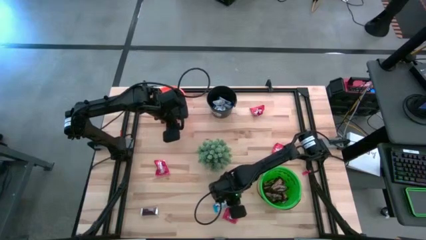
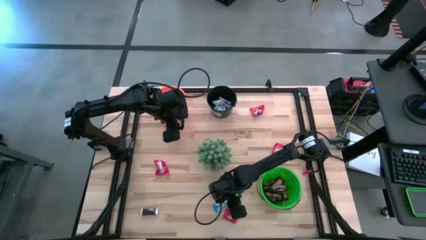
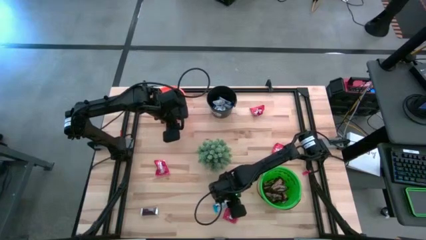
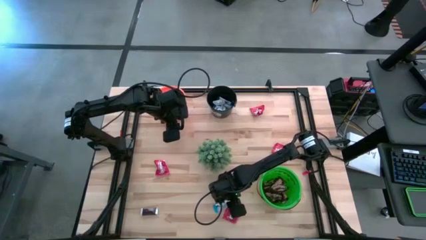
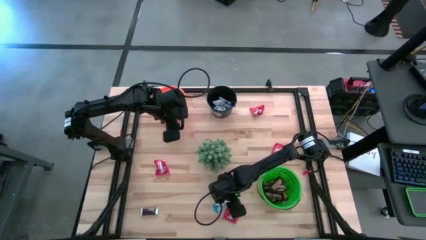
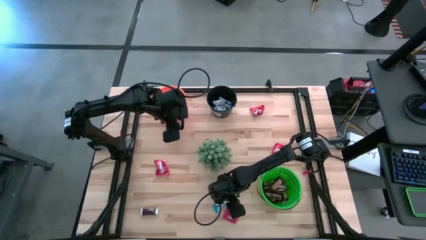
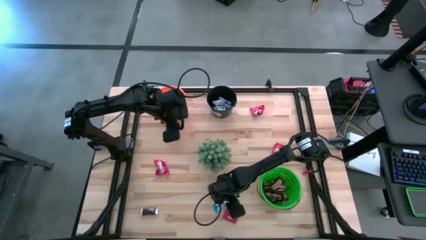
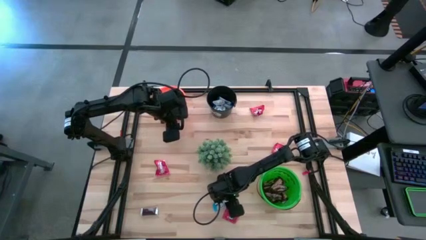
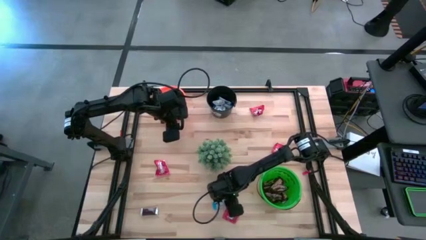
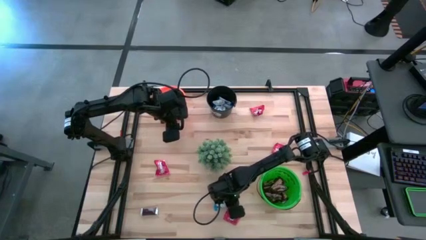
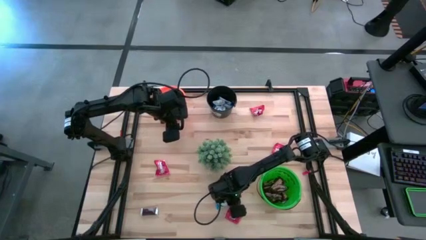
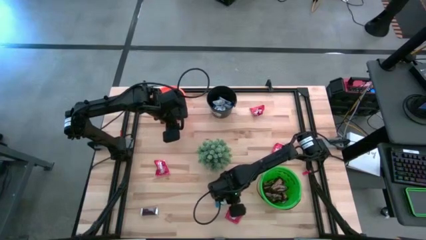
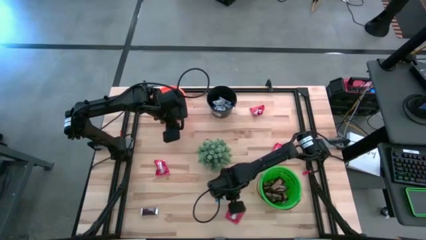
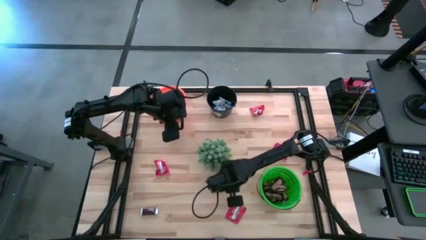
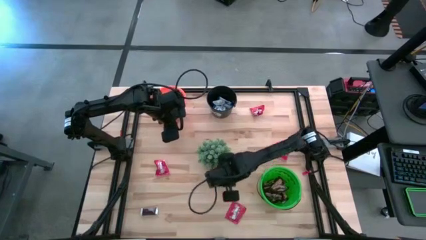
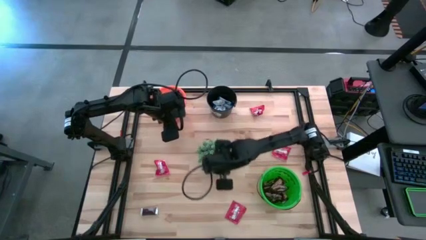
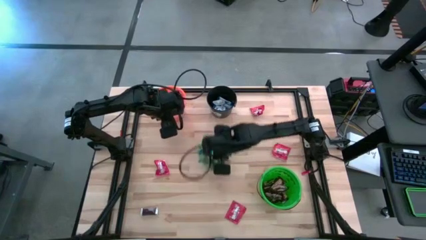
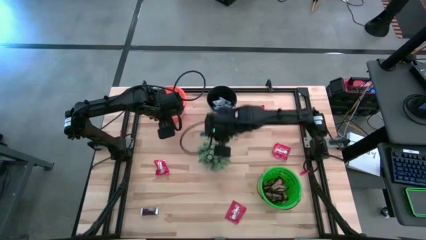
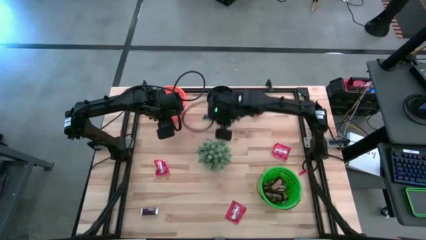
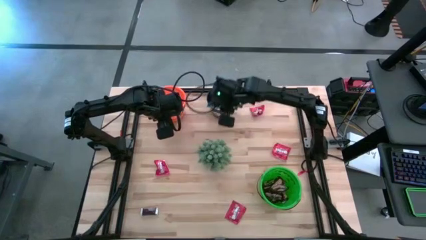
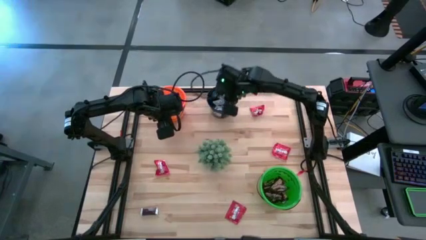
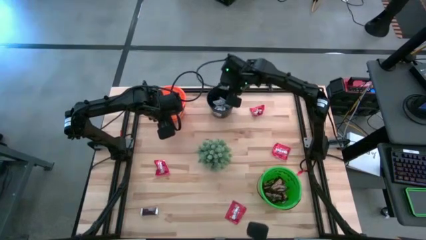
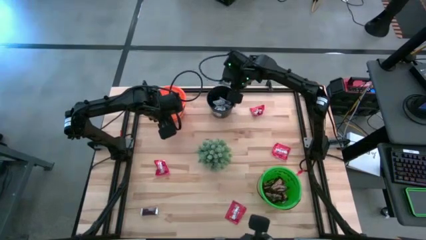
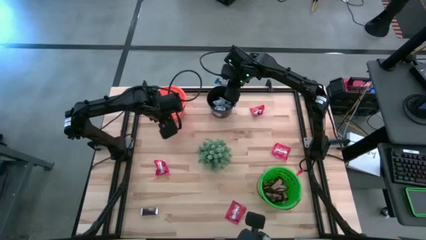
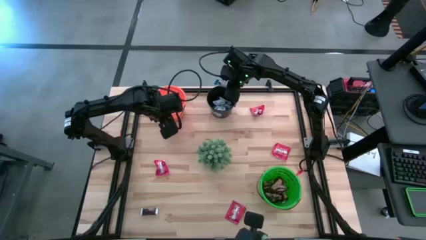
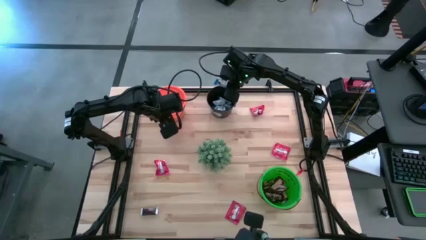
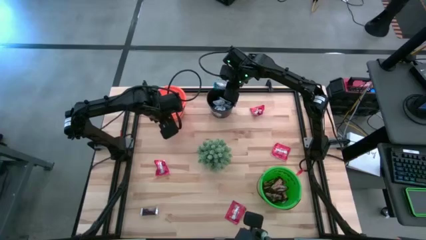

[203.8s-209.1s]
Task: Organize candy in baskets
Put the white chocolate bar into the black bucket

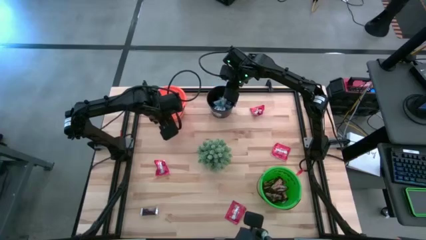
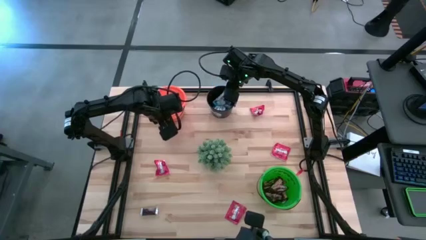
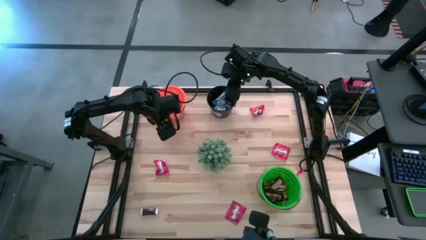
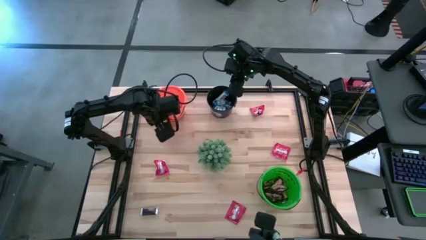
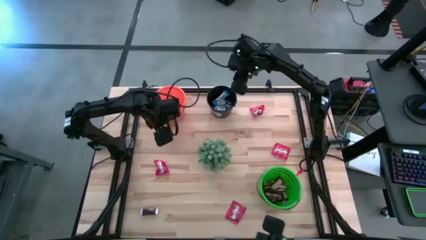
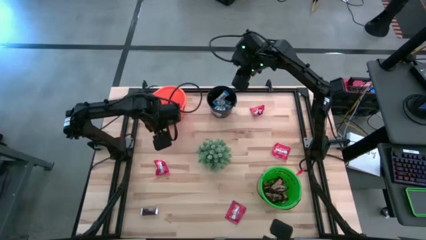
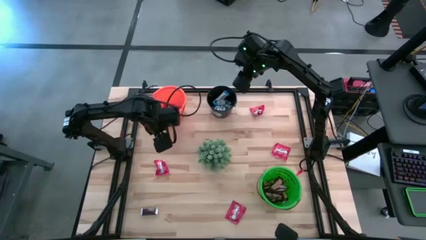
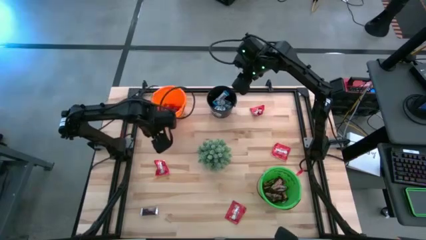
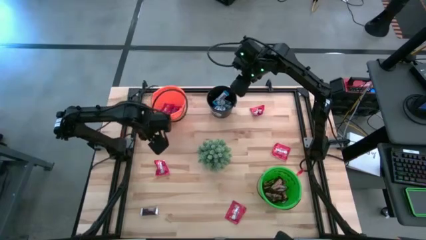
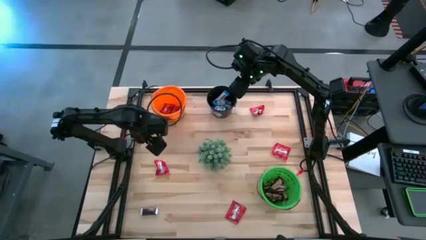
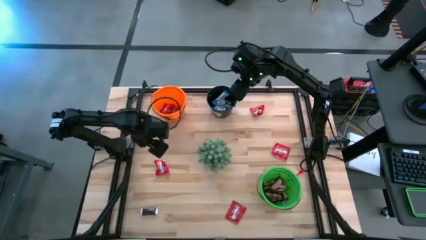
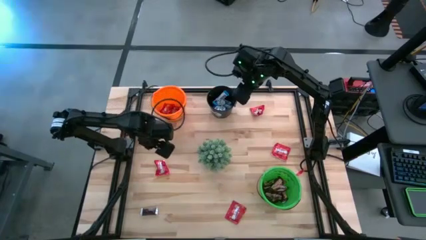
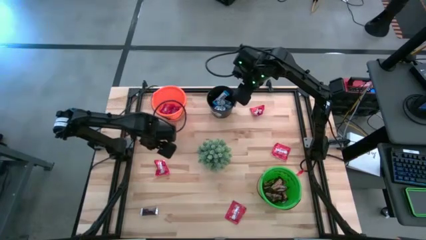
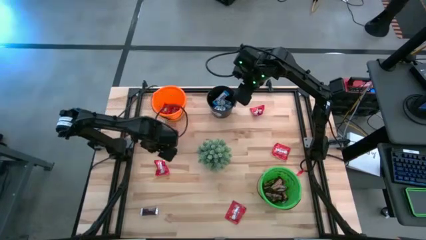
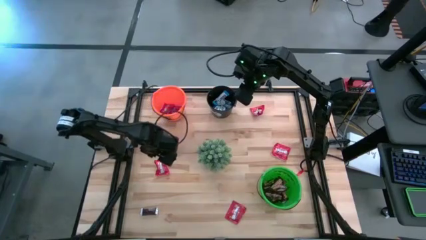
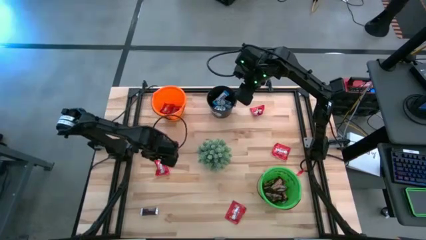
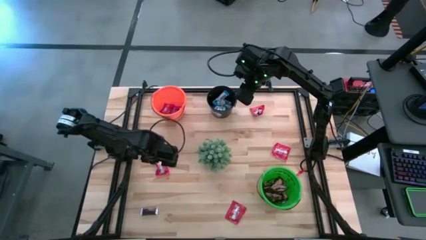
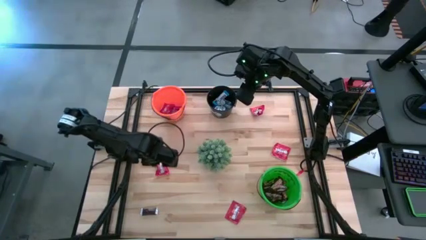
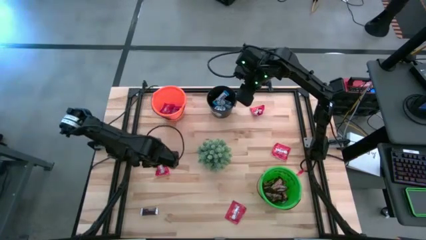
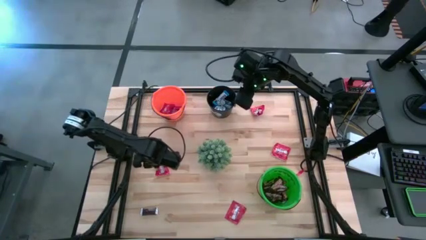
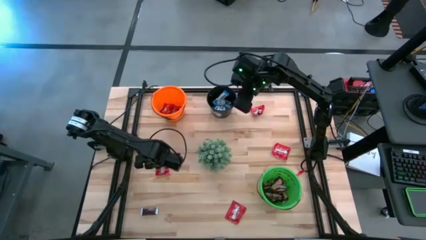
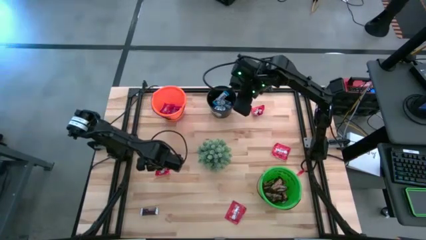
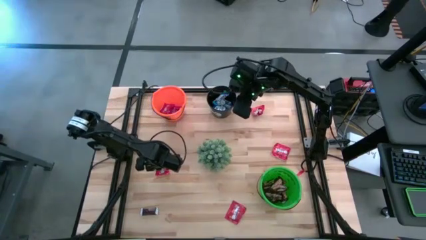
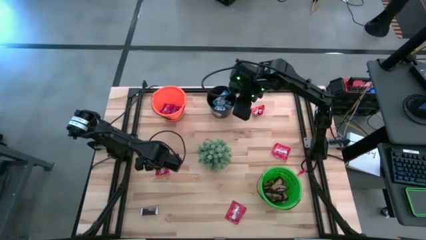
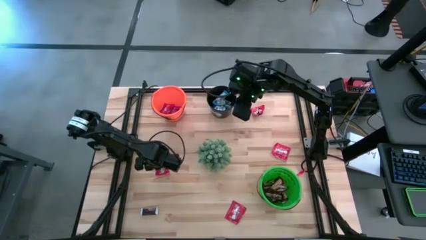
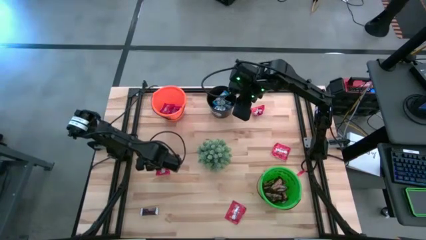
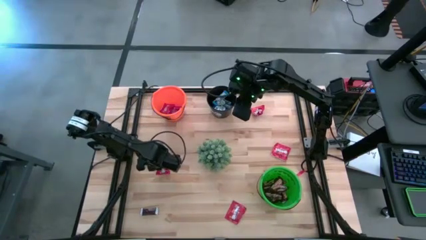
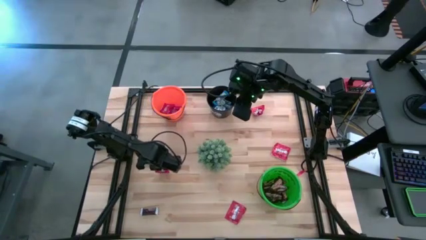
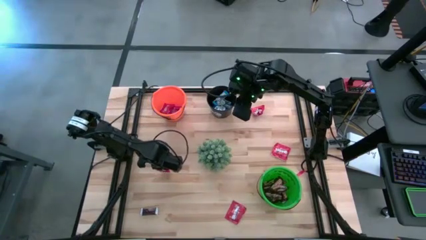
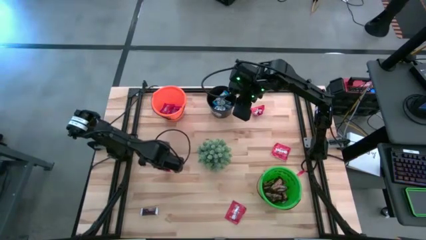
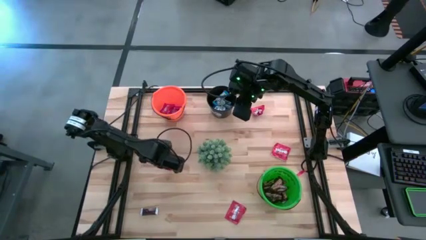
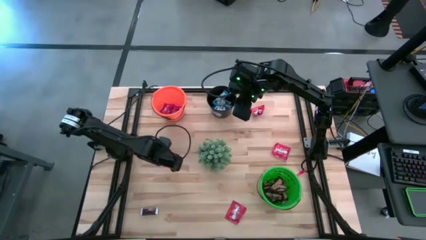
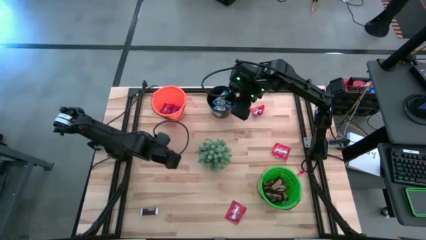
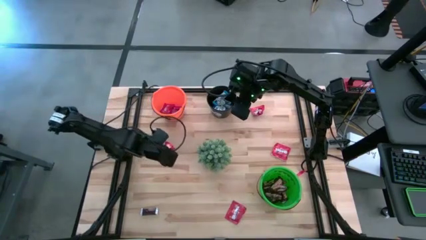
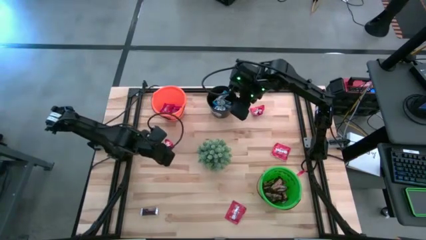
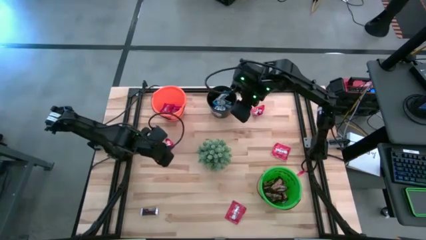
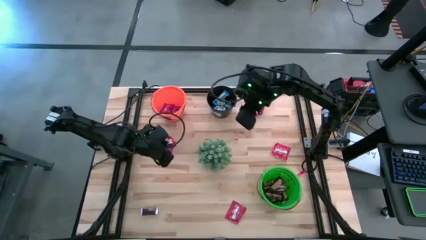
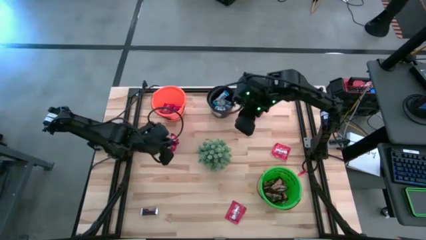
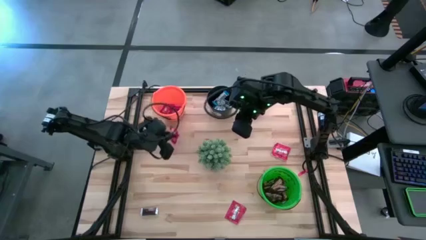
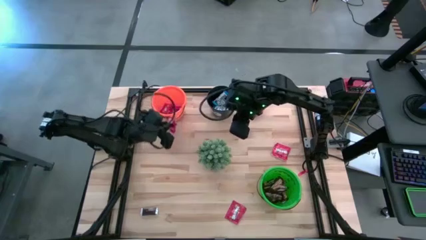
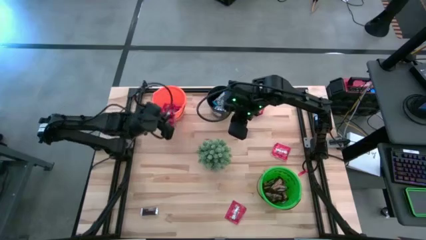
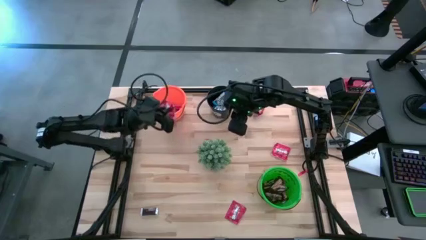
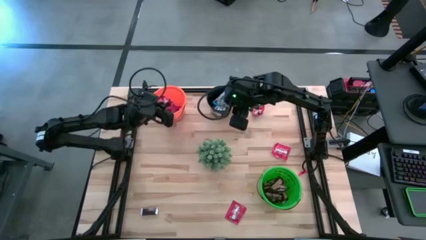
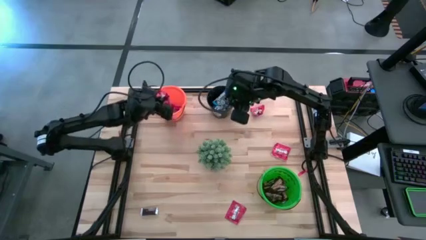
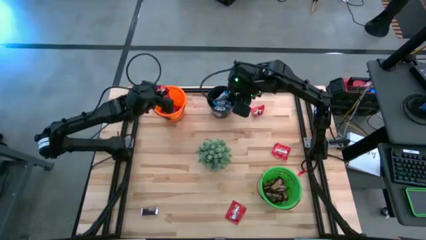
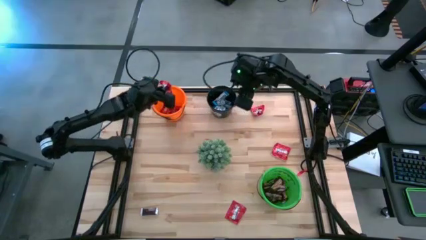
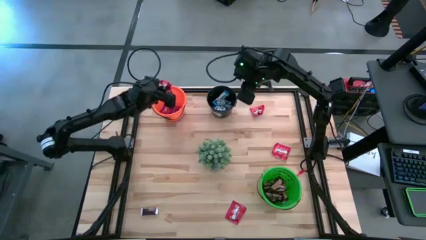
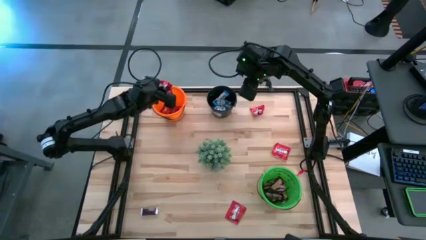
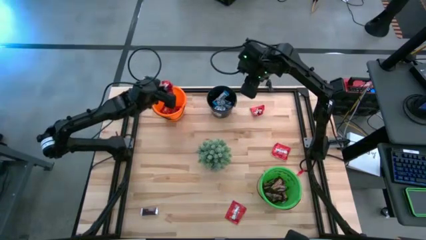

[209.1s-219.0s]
Put the red candy into the orange bucket
